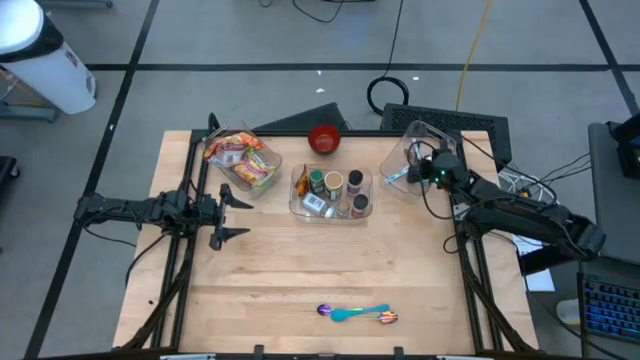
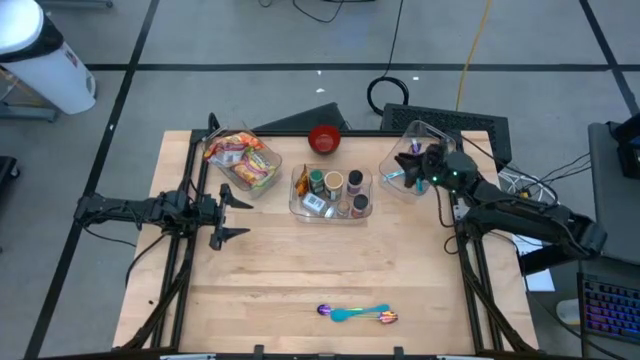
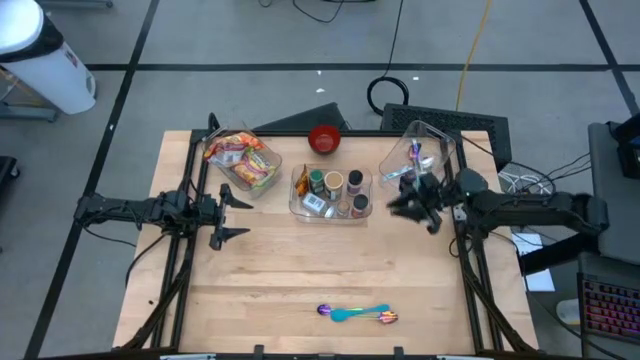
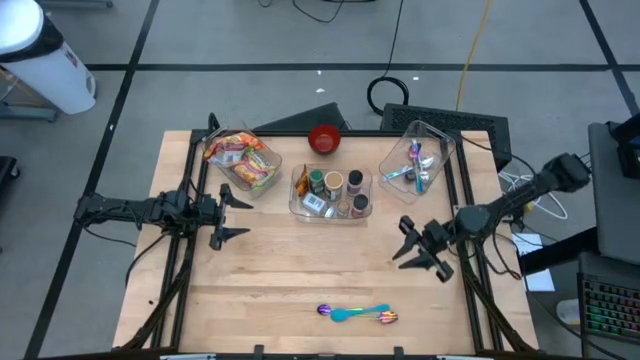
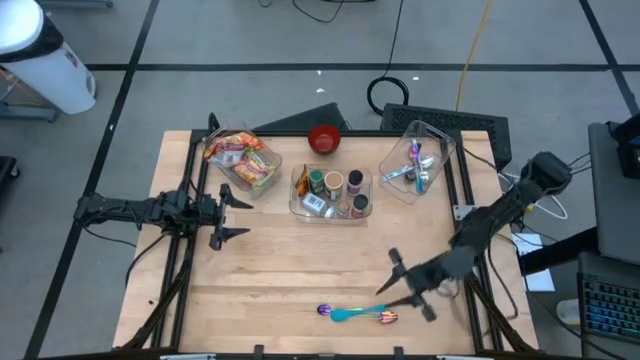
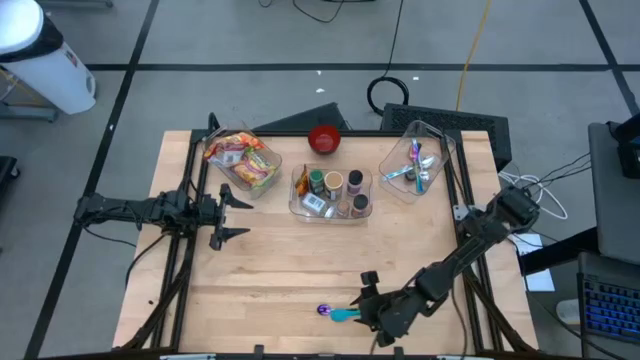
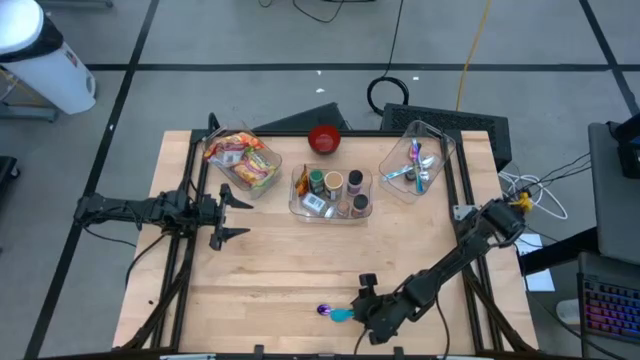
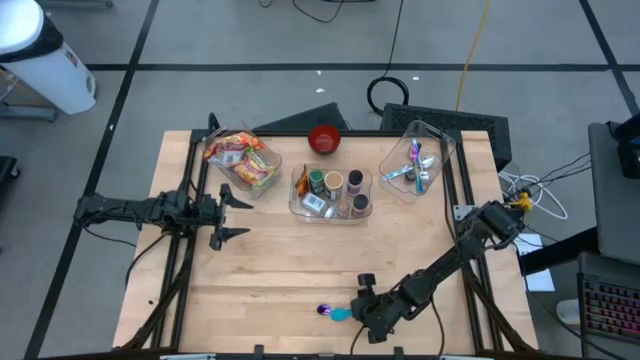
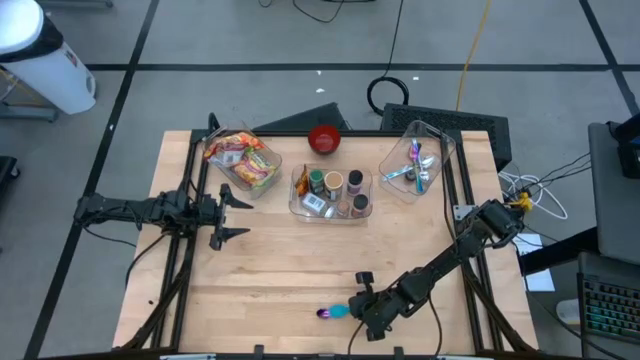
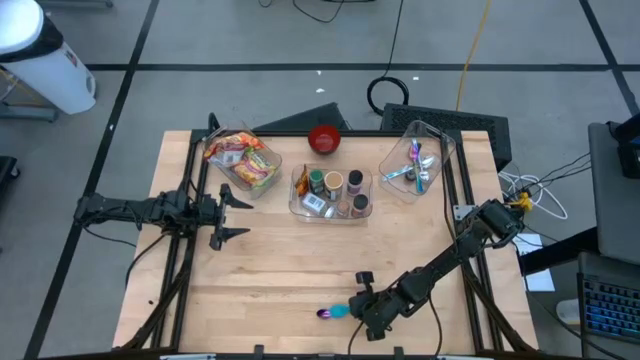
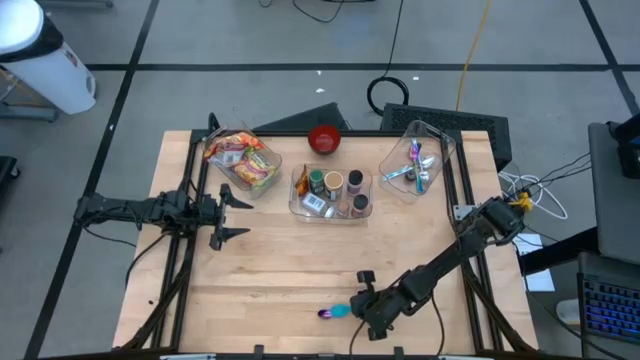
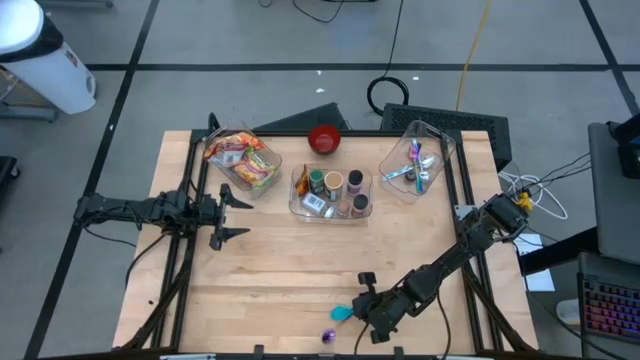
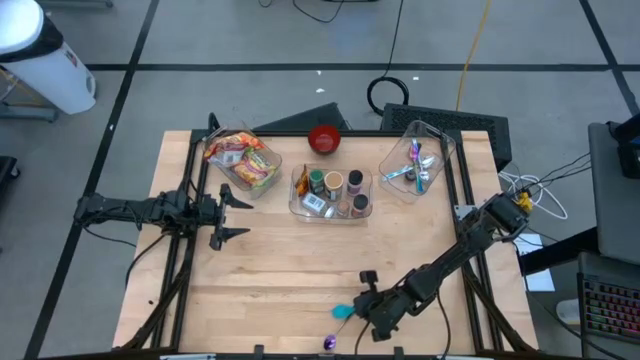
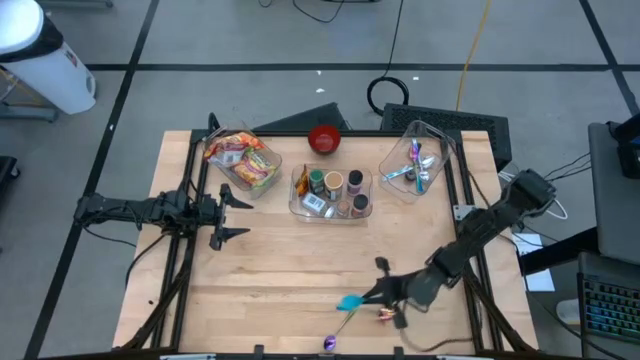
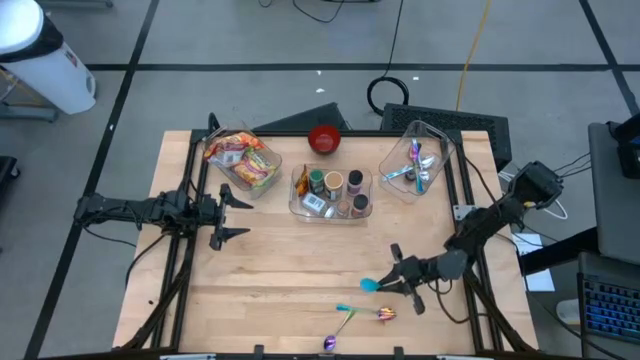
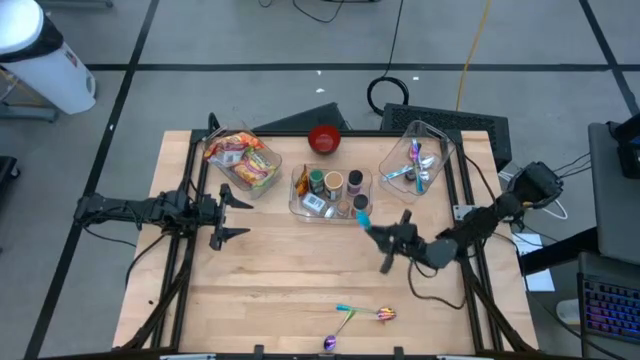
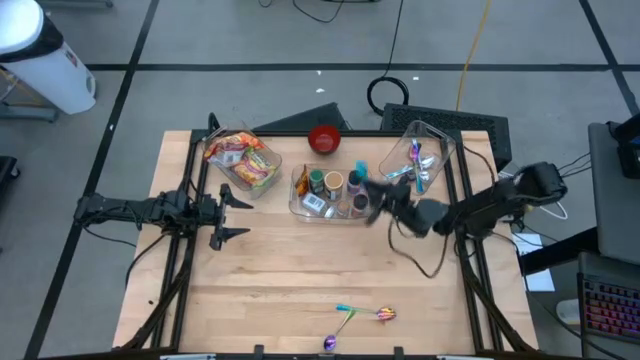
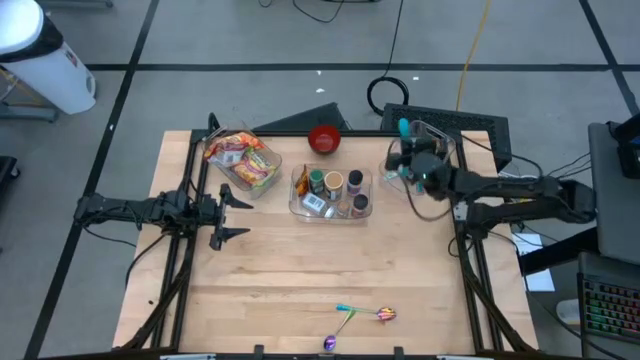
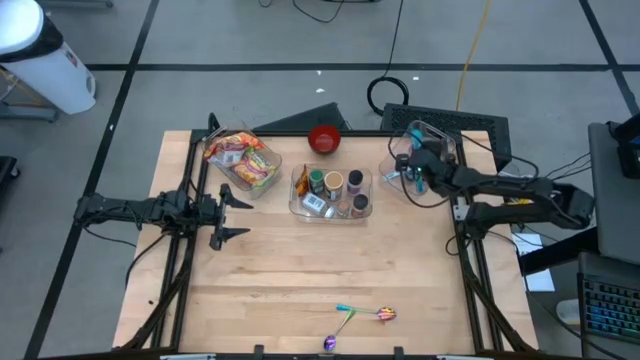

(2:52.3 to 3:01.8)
Task: Pick & Place Food Item
Put the blue baby spoon into the right transparent bin

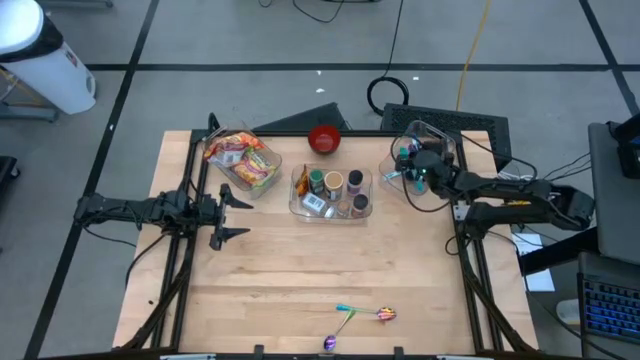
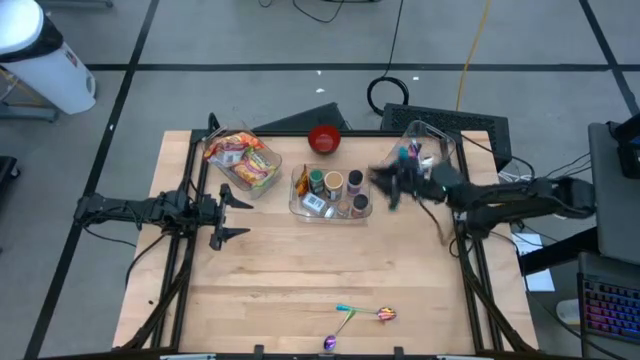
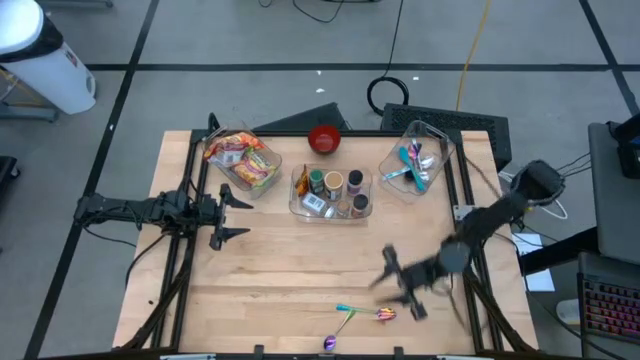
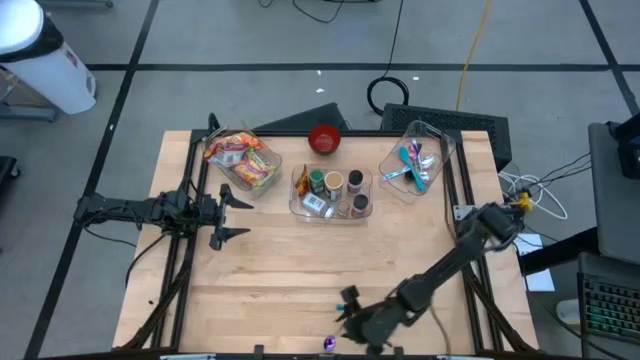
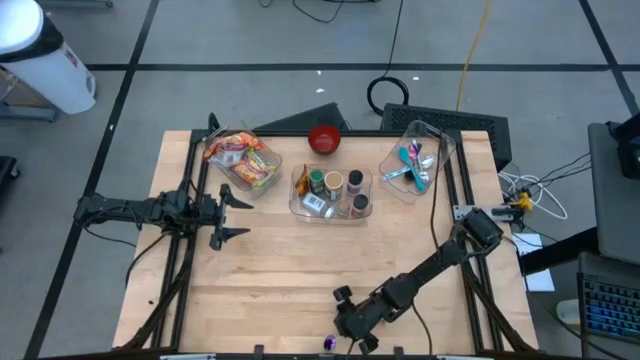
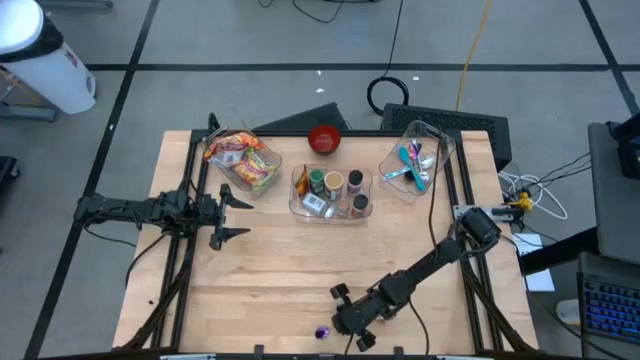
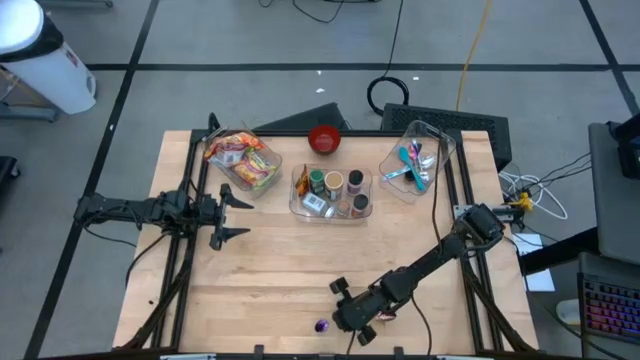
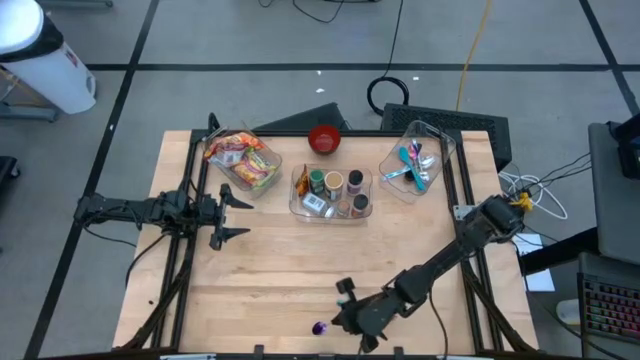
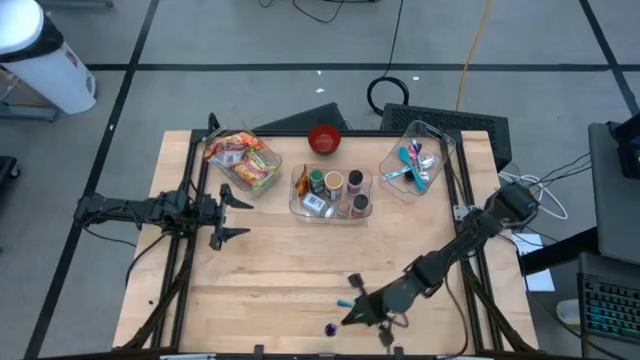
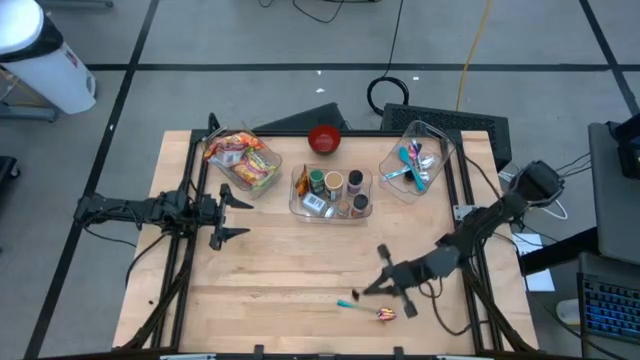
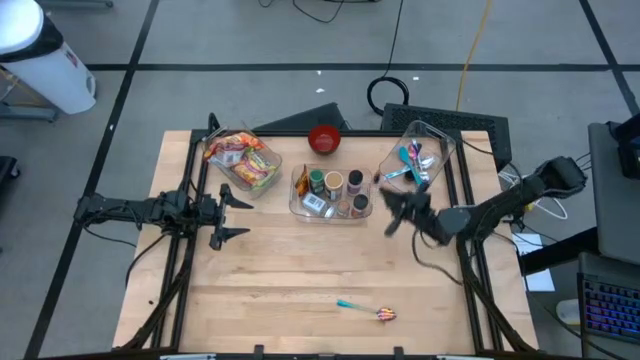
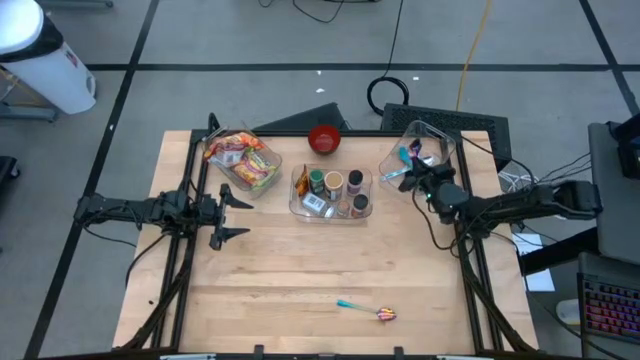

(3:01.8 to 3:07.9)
Put the bottom violet spoon into the right transparent bin

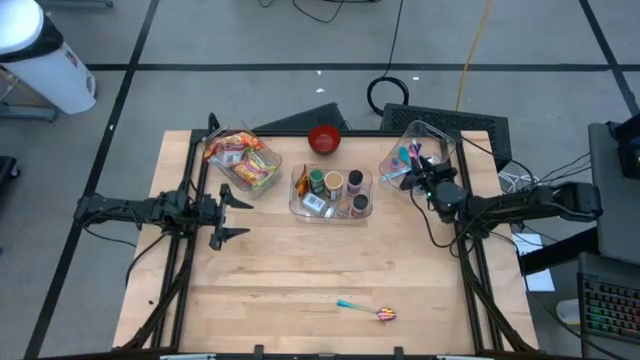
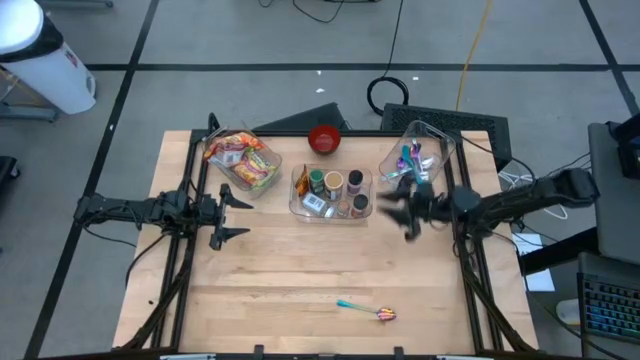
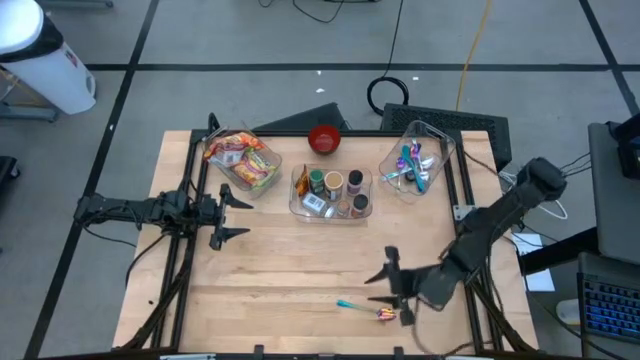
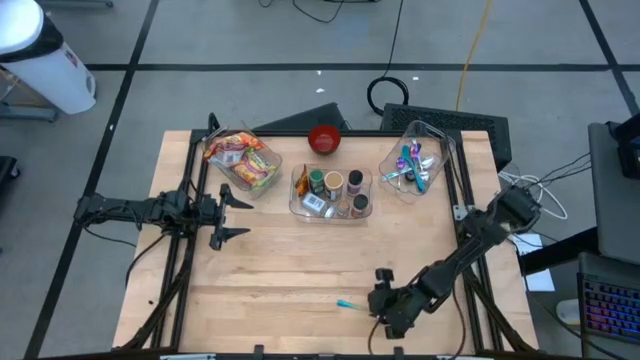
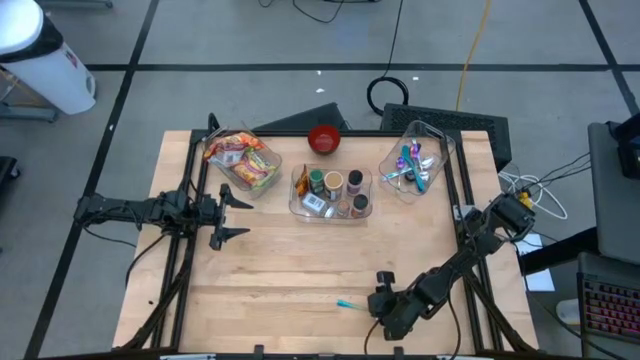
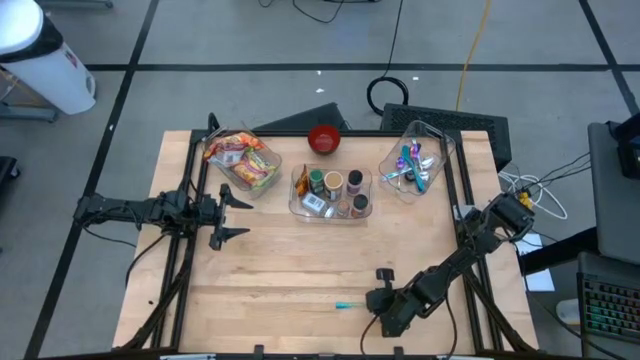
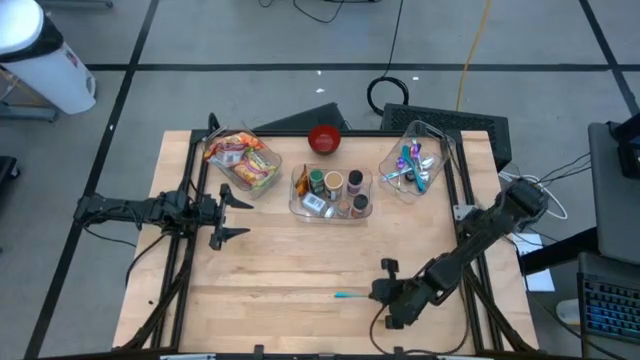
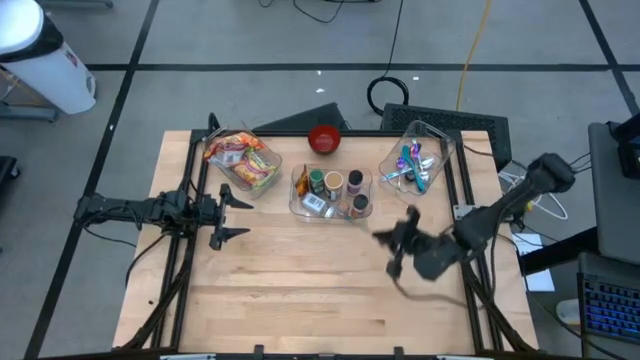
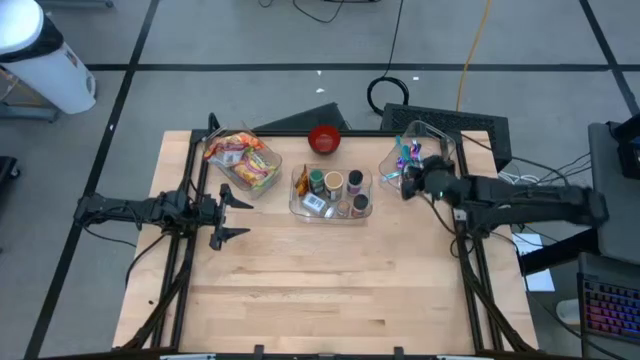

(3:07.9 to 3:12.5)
Put the violet spoon into the right transparent bin

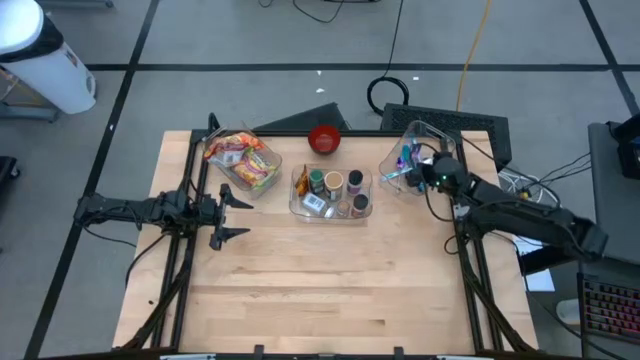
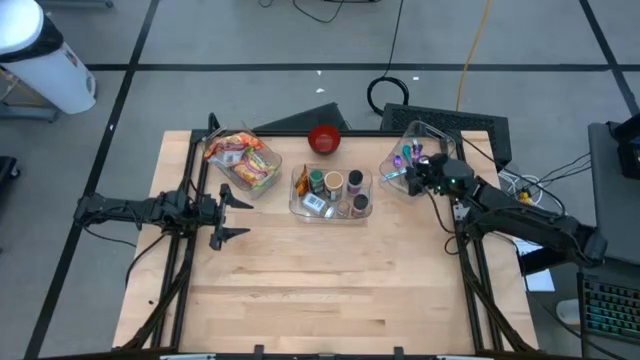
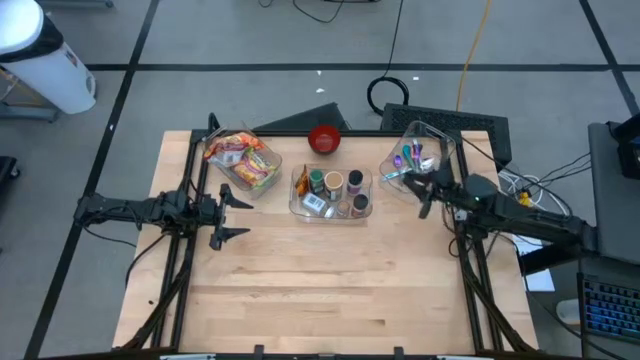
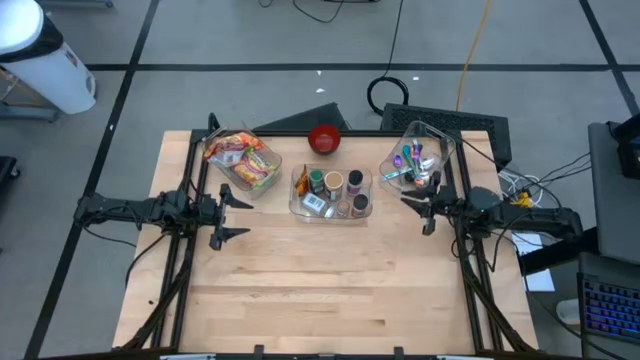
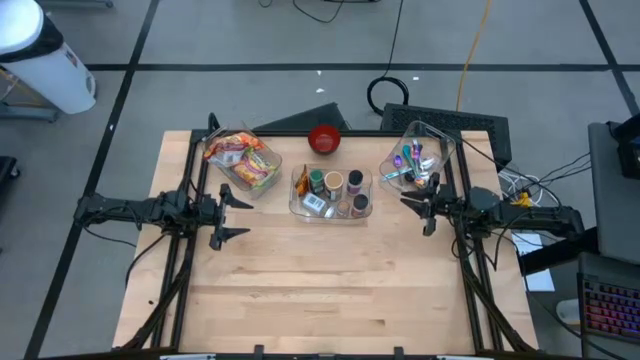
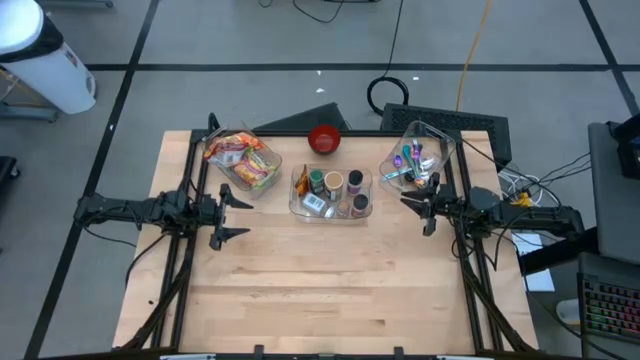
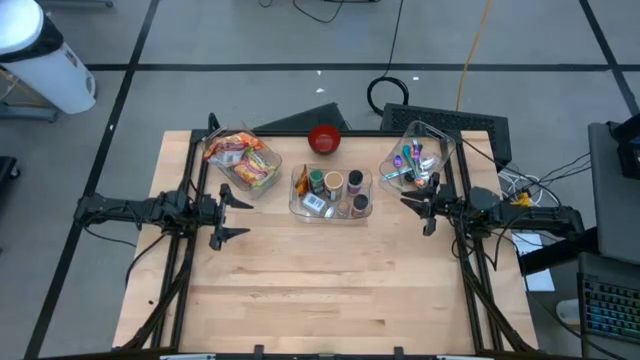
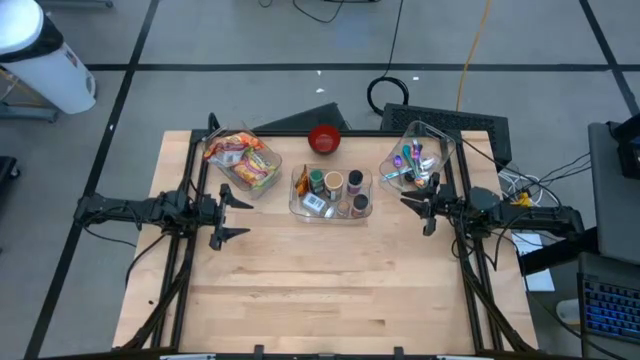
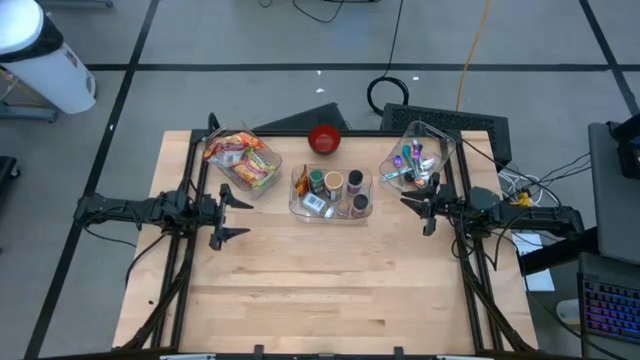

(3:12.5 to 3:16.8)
Return to home position
